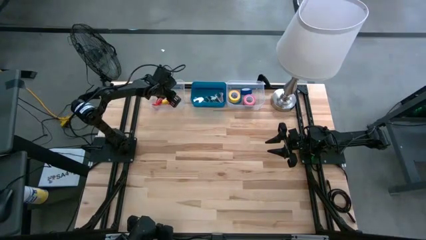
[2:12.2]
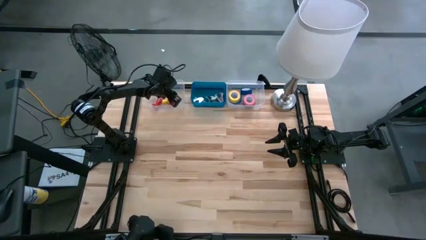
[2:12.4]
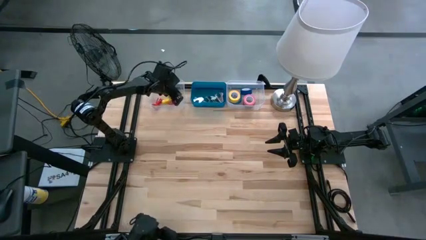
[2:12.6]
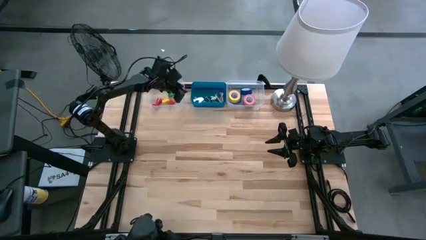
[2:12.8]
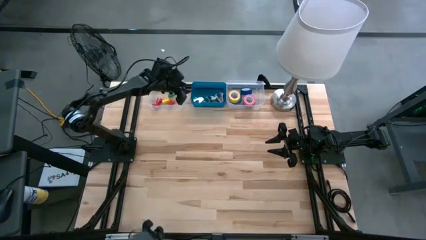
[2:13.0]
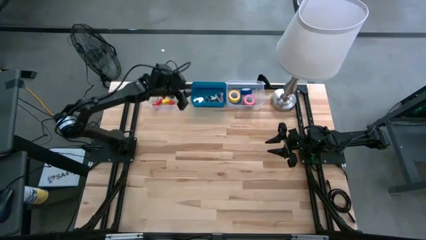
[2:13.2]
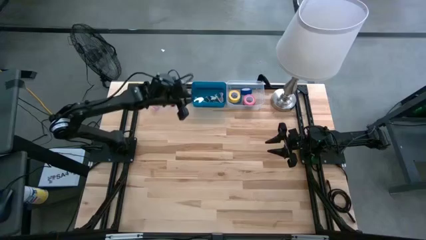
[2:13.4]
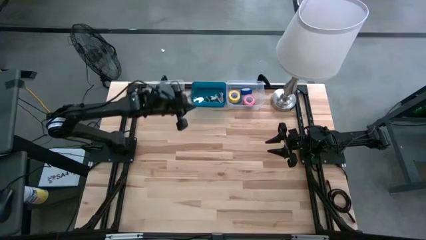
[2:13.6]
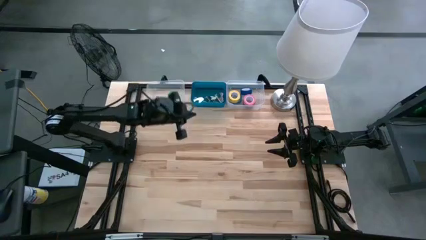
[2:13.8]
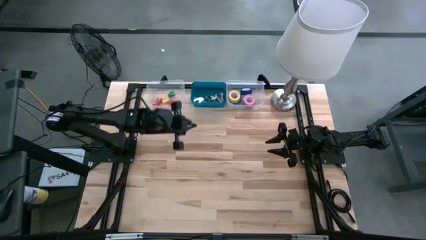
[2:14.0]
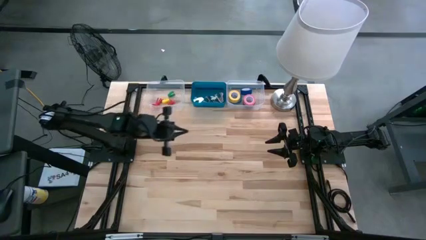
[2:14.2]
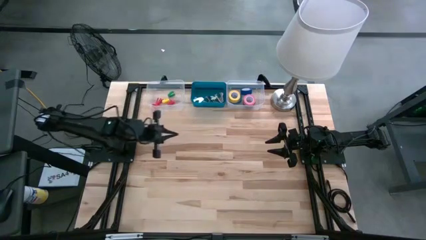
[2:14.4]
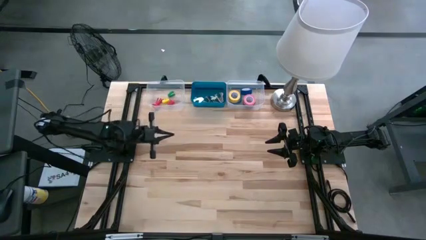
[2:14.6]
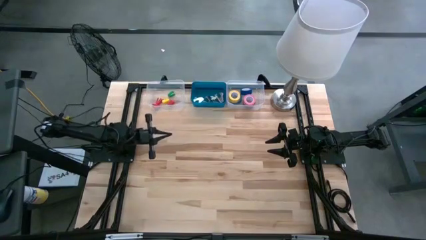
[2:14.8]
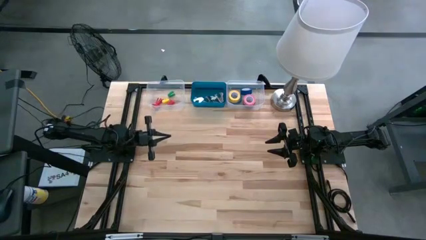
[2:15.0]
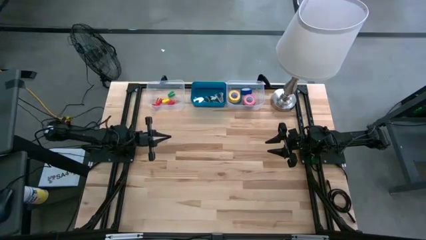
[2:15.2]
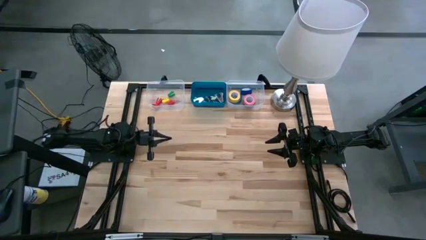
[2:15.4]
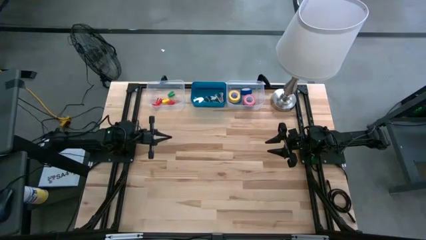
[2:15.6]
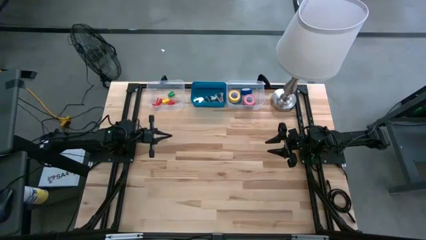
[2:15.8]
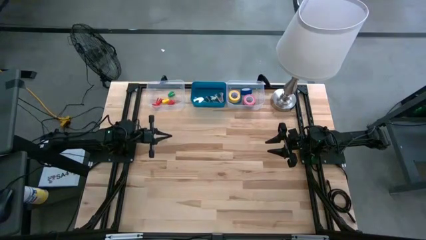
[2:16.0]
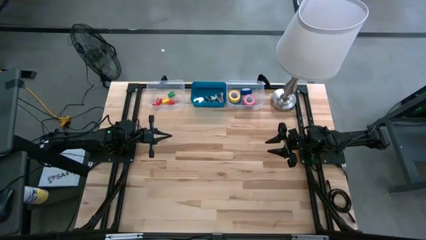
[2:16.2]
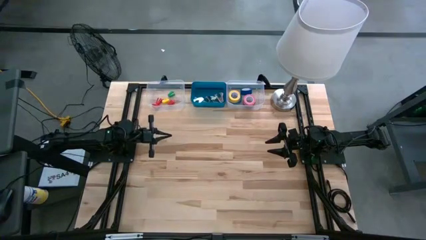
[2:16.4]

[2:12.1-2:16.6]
Task: Pick and place Stapler, Stapler remover, tape
Return to Home Position

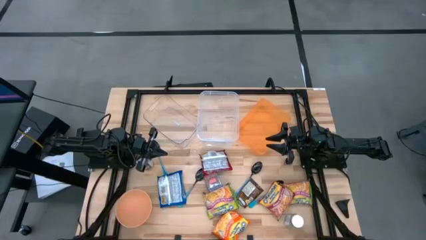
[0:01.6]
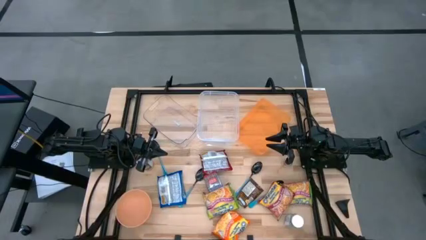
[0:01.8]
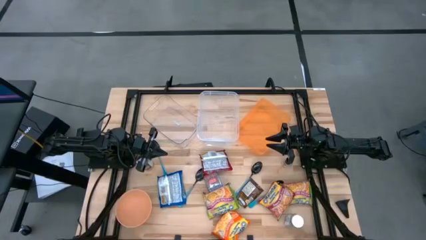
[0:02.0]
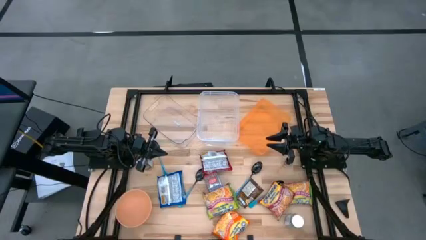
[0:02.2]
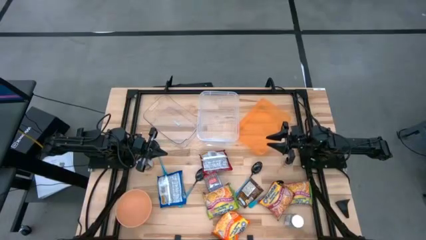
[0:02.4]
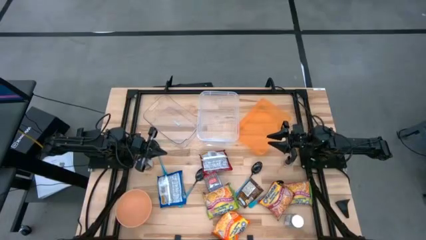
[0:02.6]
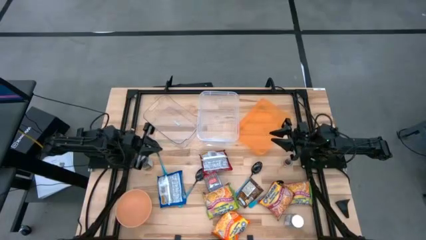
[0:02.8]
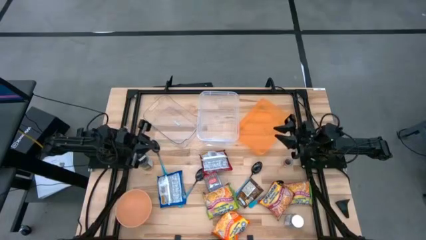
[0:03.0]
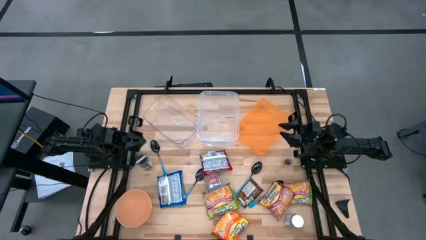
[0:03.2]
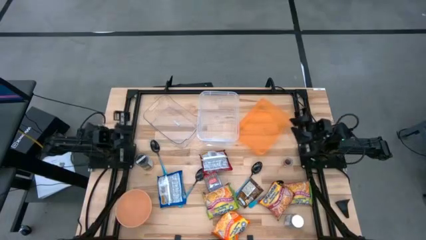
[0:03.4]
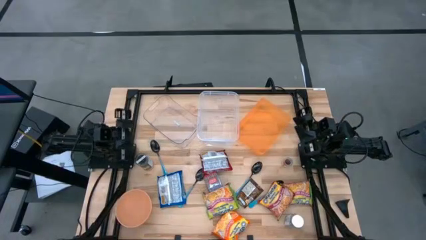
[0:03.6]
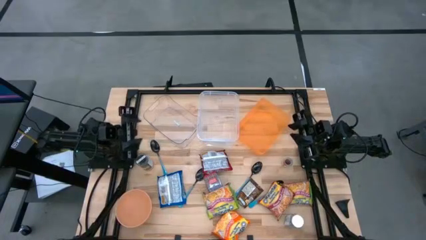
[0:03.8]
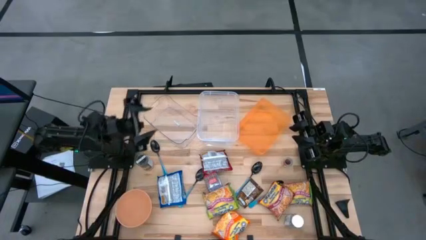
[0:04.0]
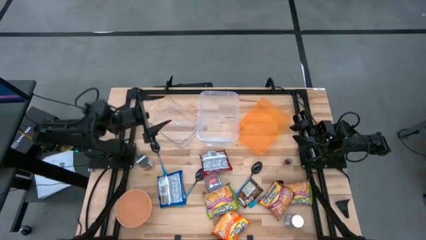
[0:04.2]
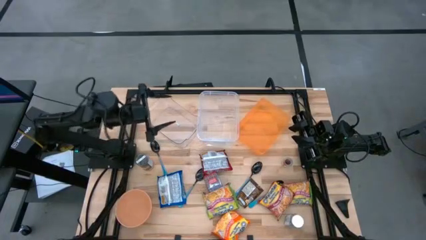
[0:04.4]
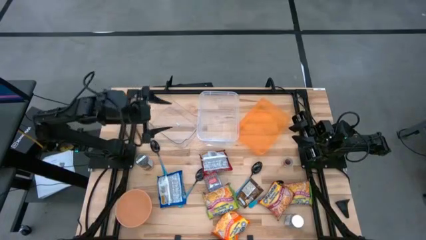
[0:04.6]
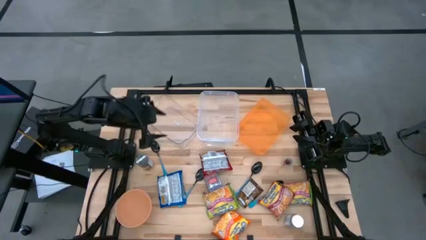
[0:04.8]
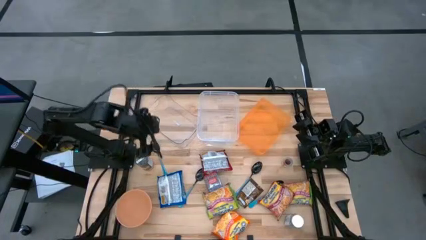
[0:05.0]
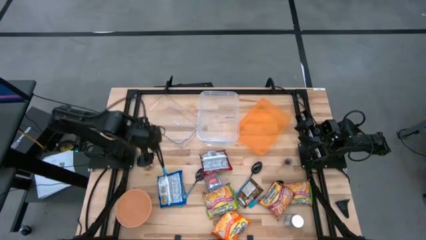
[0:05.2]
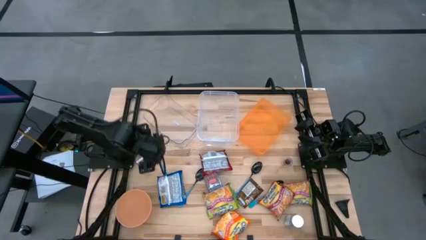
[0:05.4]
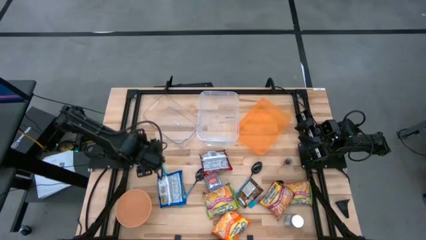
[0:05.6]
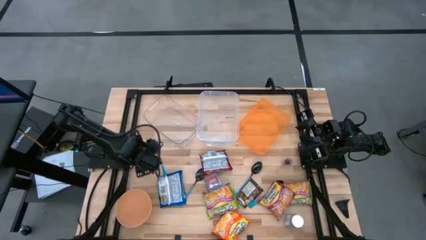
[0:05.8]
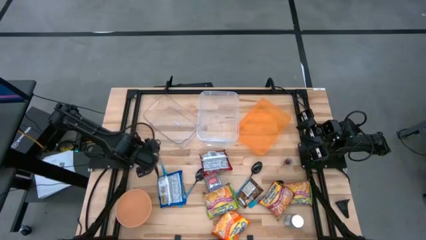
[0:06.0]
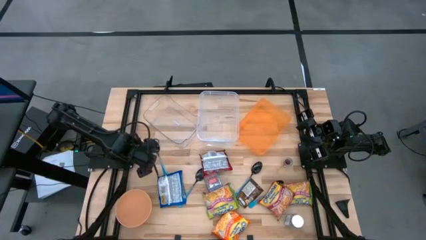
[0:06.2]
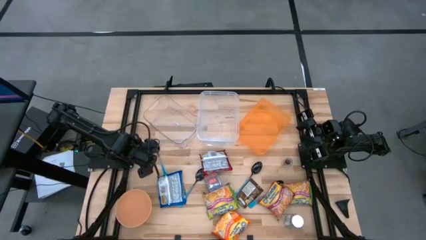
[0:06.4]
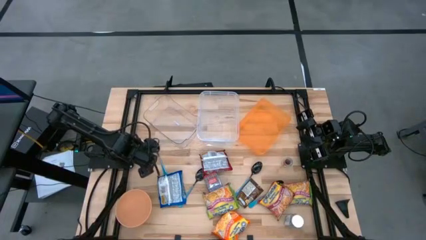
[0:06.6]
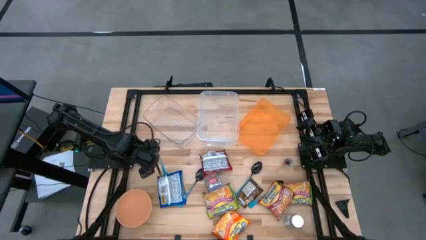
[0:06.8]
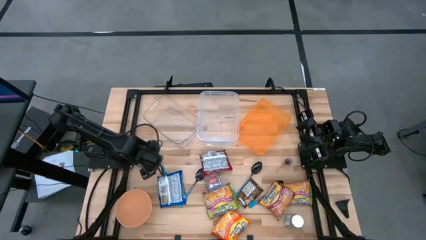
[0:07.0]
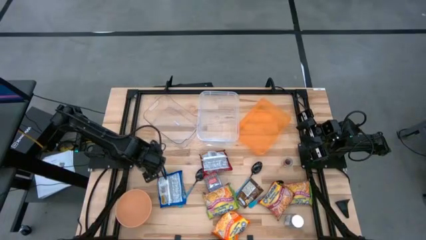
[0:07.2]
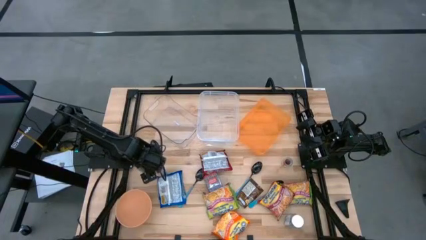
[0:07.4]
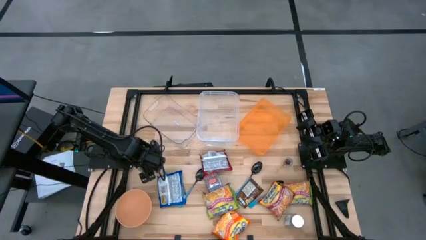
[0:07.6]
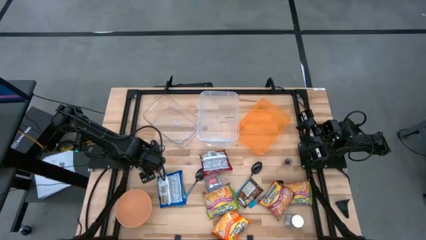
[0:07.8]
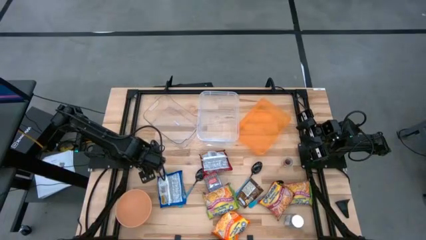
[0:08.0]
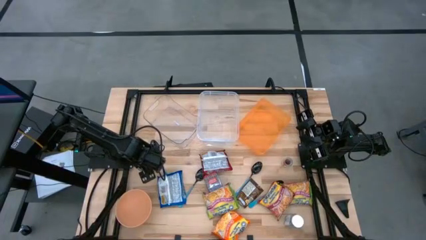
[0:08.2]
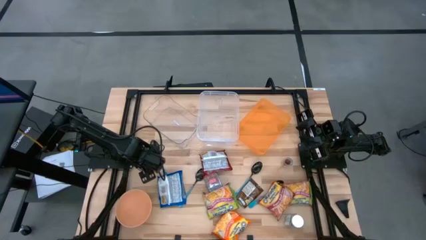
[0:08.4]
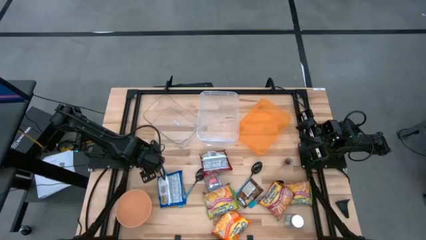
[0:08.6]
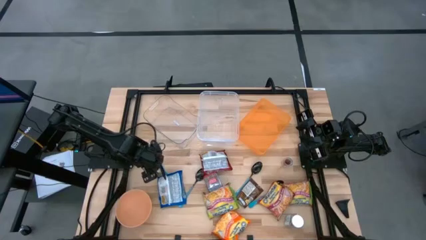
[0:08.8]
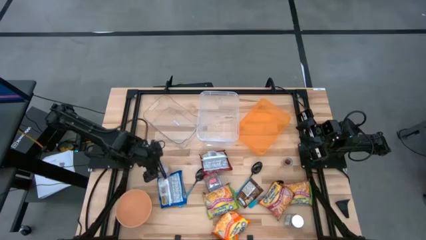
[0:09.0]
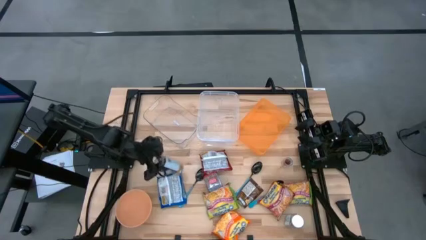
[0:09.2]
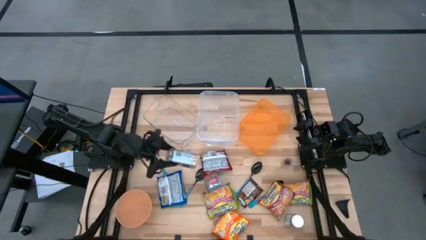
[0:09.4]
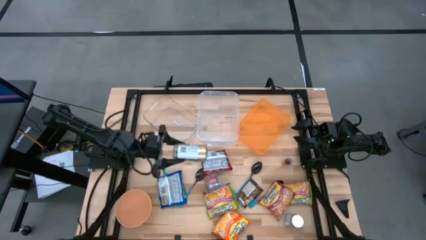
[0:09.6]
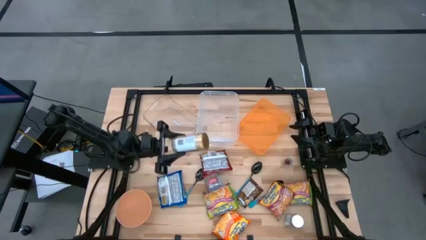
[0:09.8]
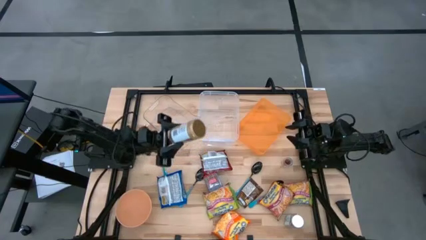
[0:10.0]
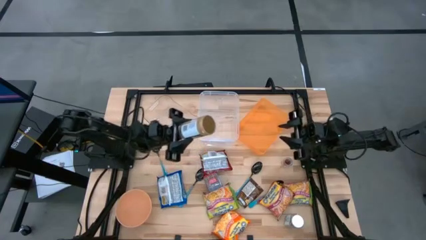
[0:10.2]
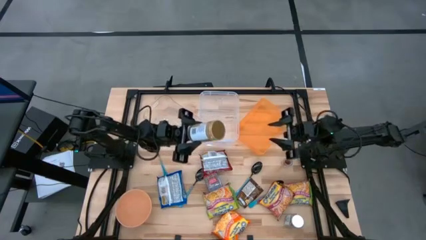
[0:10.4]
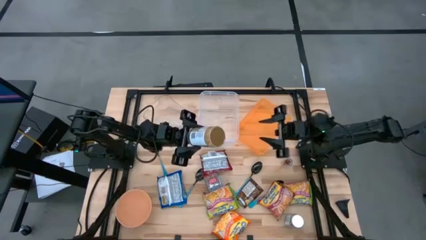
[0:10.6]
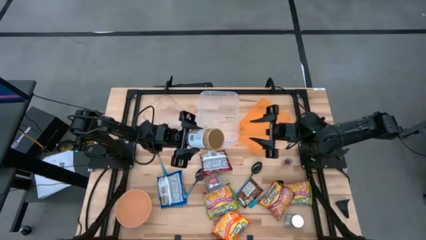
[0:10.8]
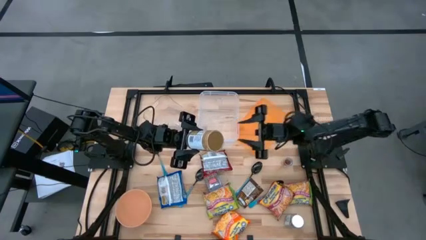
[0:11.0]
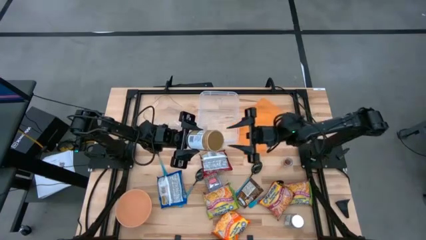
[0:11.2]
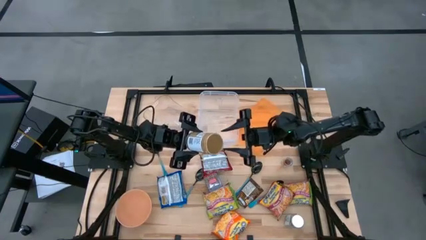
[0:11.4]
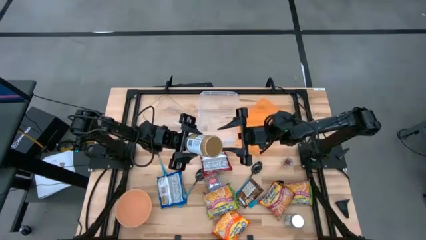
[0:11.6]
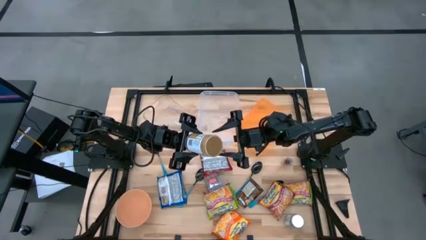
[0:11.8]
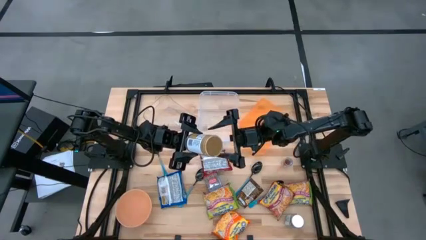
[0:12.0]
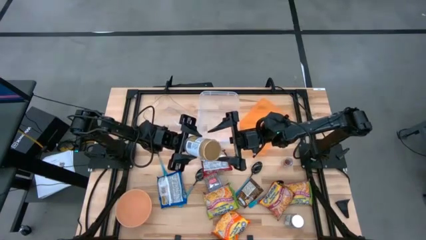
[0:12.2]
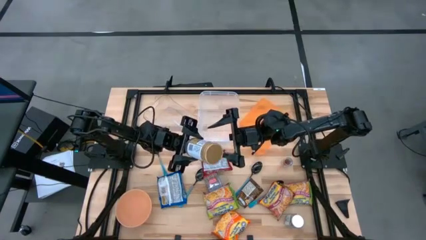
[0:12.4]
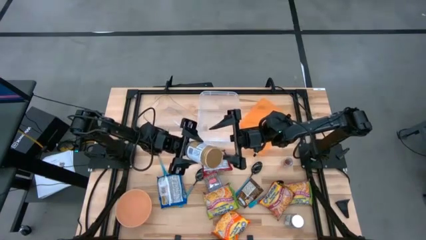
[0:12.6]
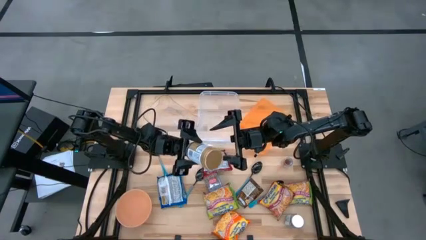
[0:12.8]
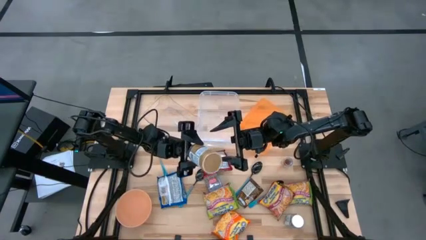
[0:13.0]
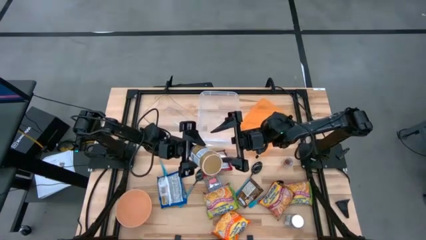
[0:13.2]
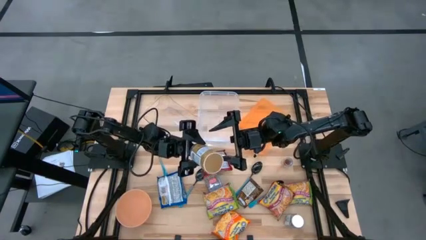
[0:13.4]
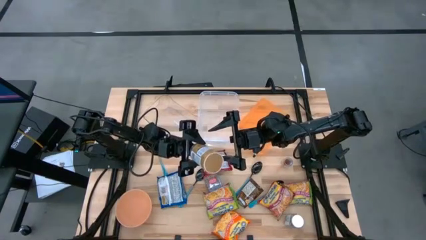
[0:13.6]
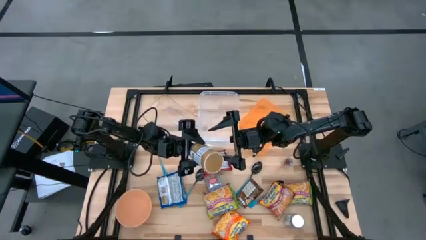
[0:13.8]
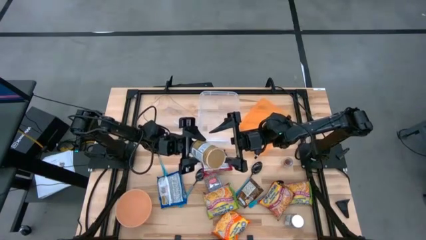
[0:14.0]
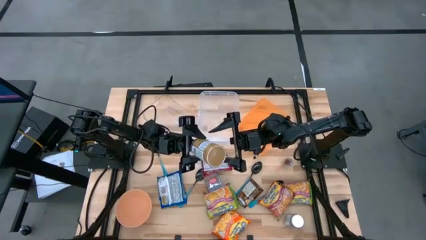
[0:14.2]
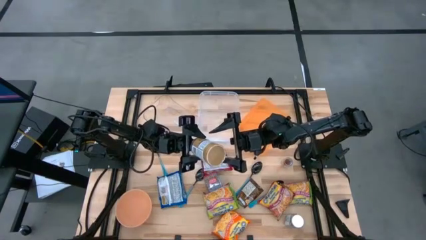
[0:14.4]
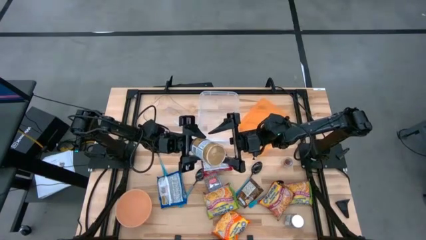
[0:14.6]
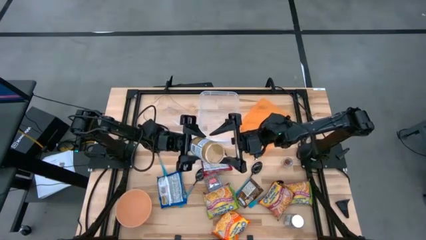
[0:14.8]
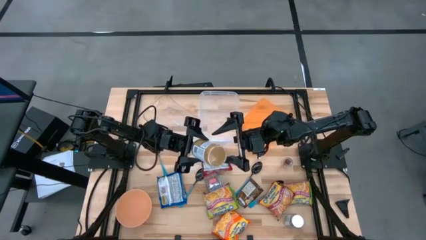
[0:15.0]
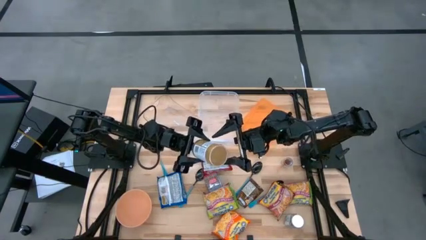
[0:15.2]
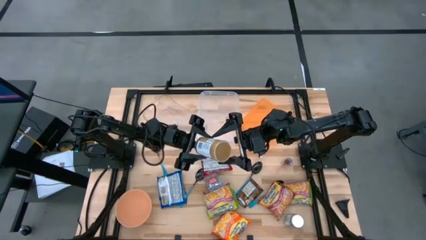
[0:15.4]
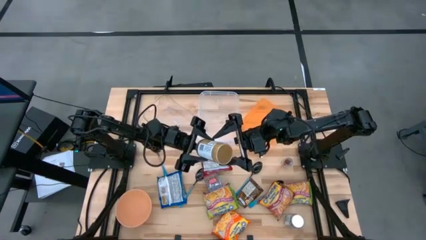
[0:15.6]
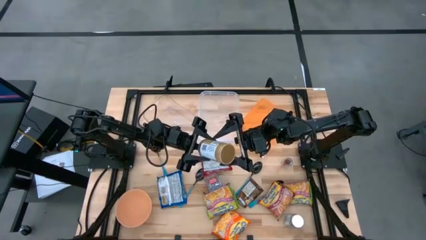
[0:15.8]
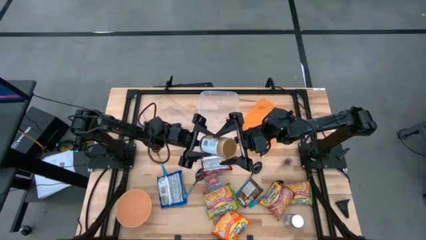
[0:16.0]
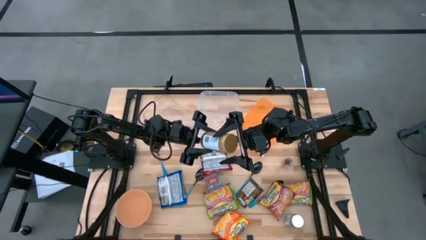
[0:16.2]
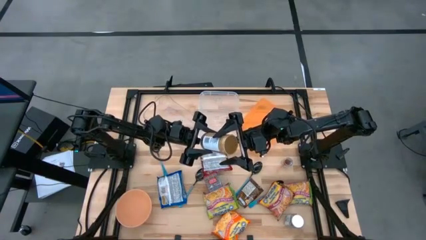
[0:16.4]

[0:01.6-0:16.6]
Task: Pick & Place Food Item
Put the golden seasoning bottle into the transparent bin
